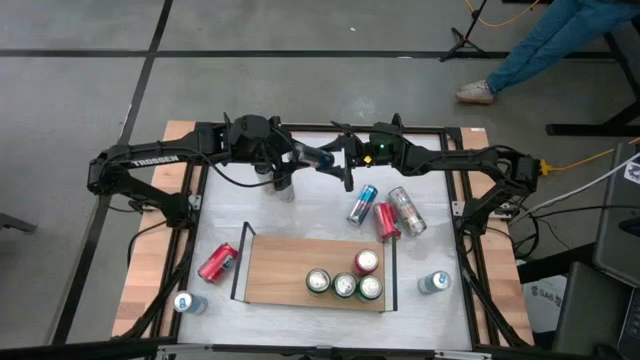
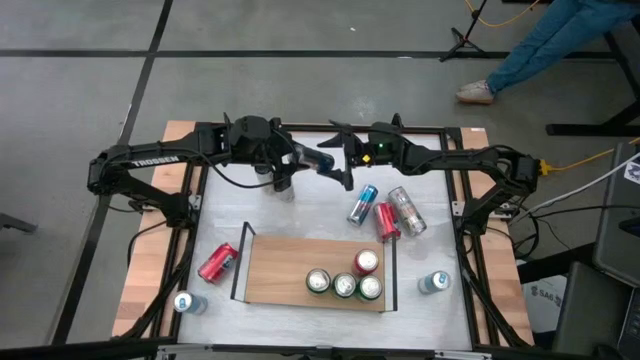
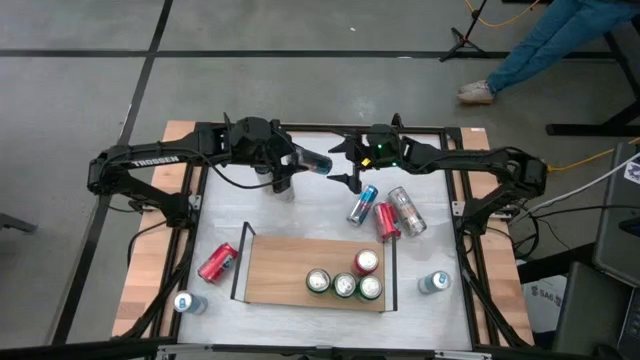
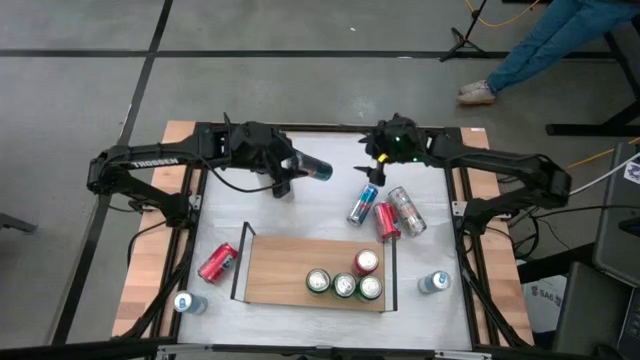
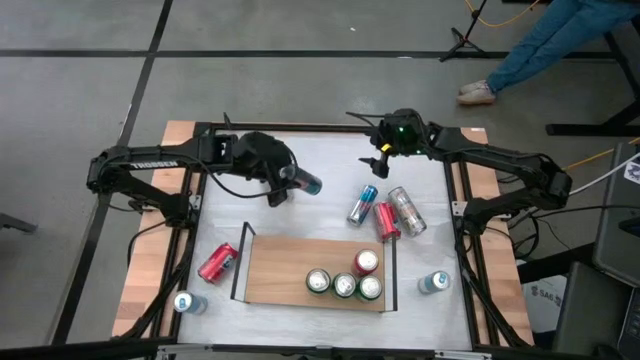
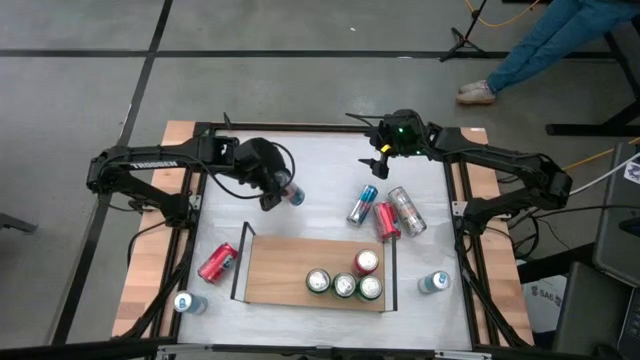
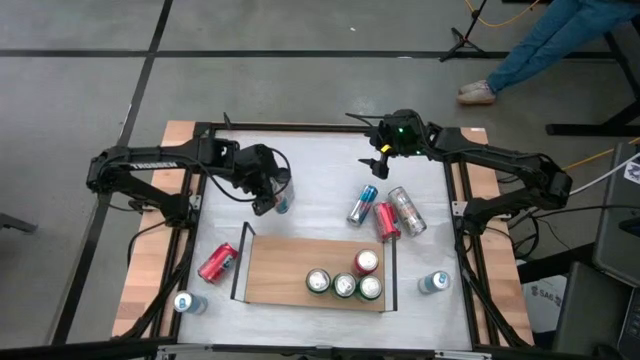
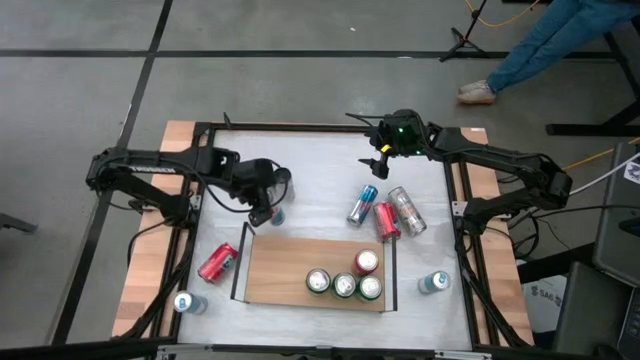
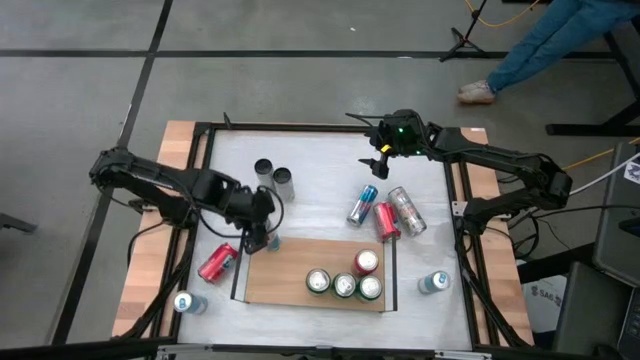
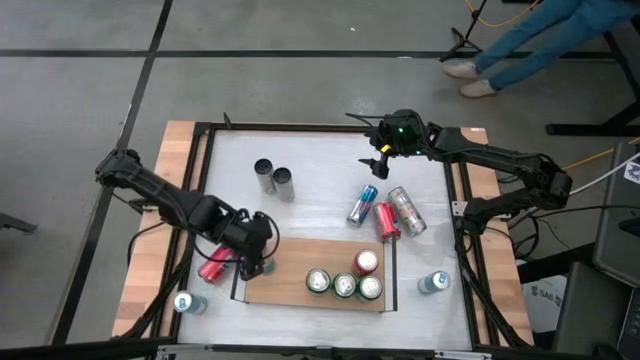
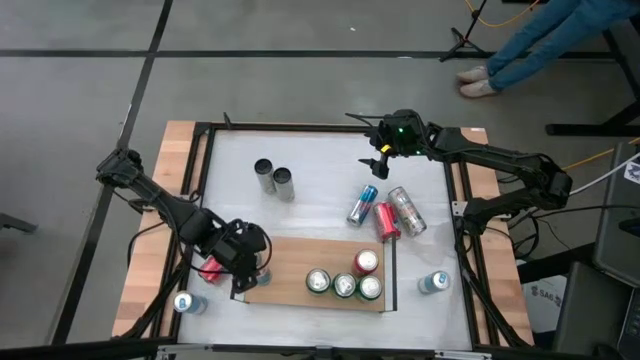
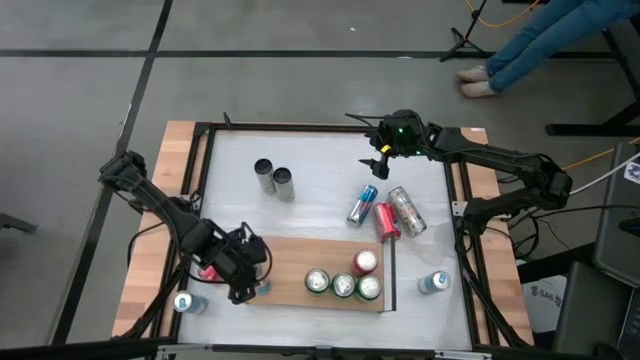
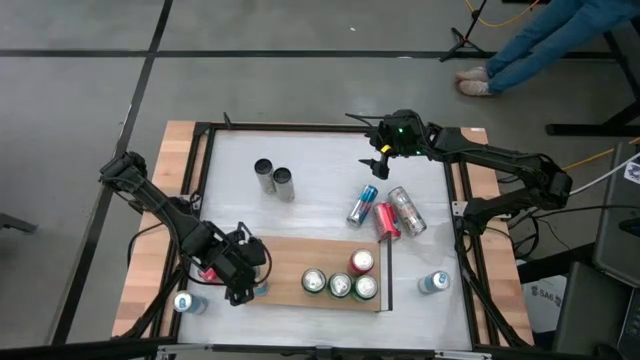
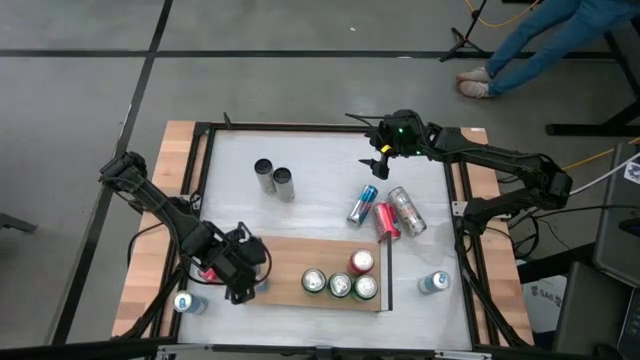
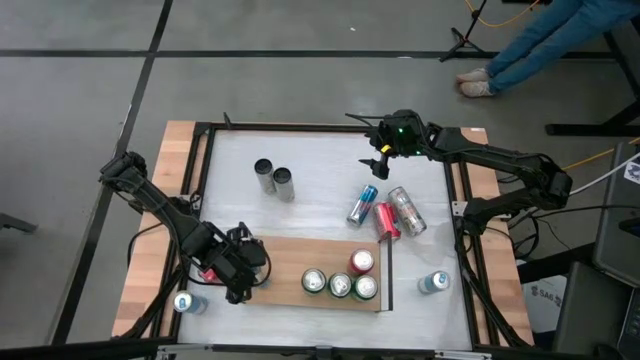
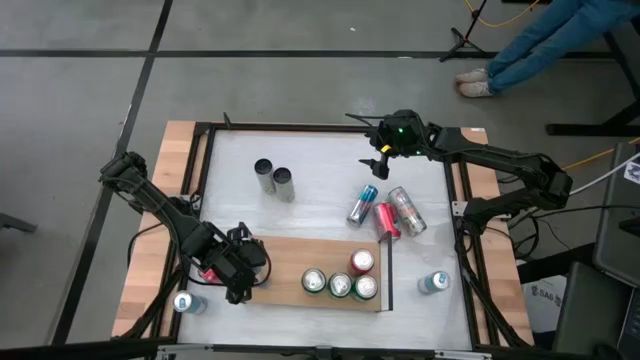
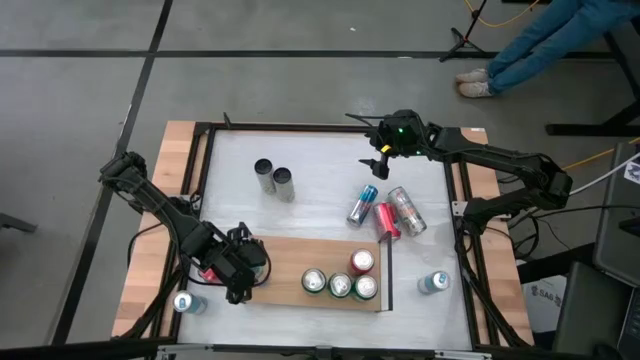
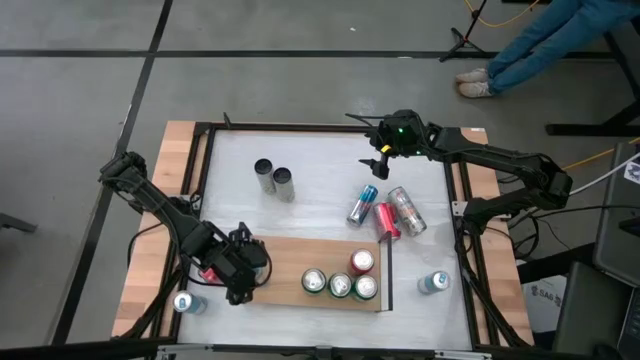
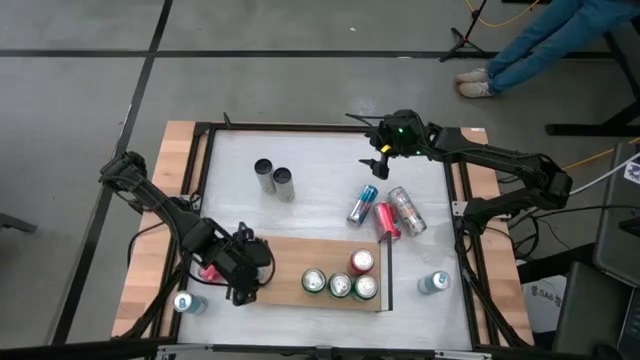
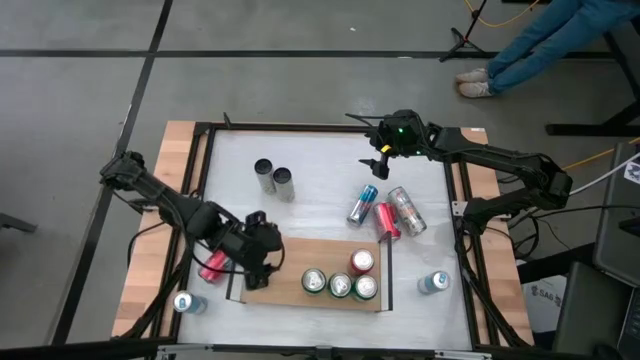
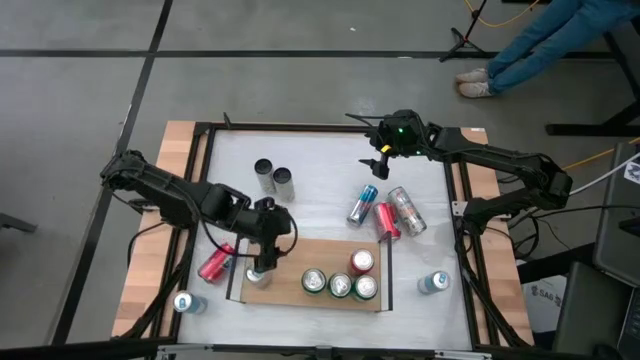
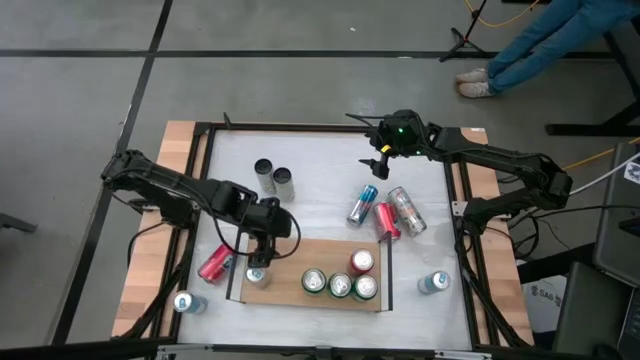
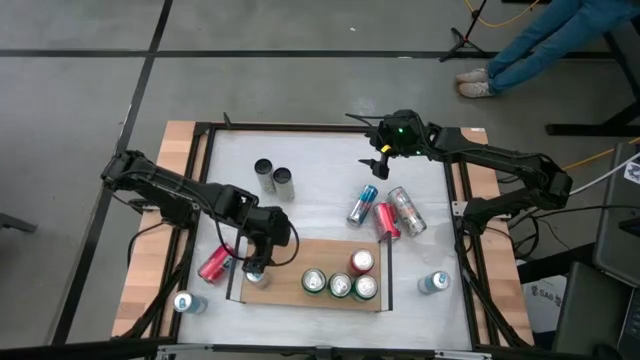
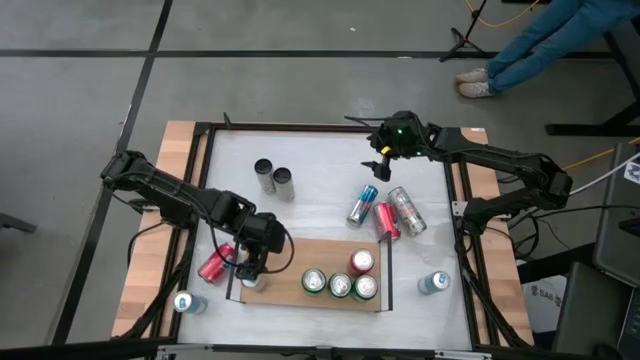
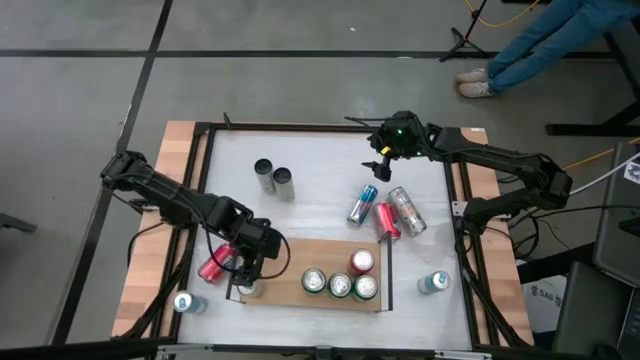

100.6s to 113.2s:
Task: Place canned beverage on shelf
Put the blue soda can on the shelf

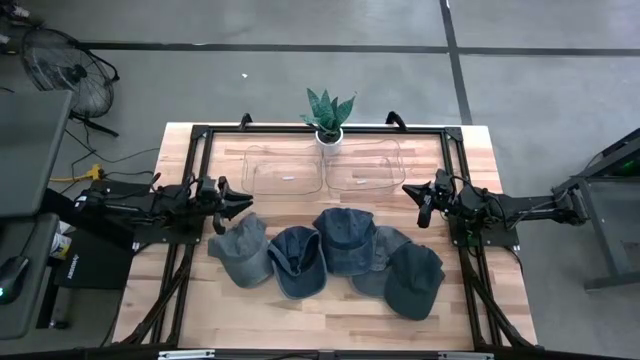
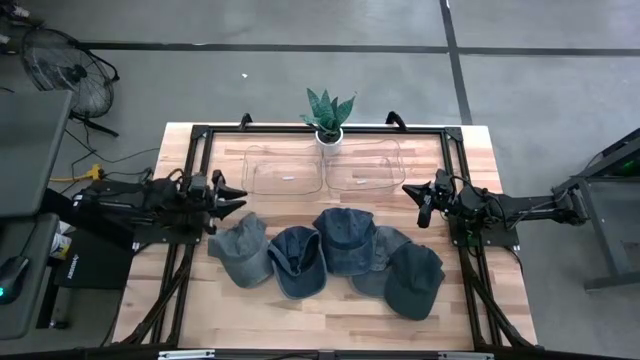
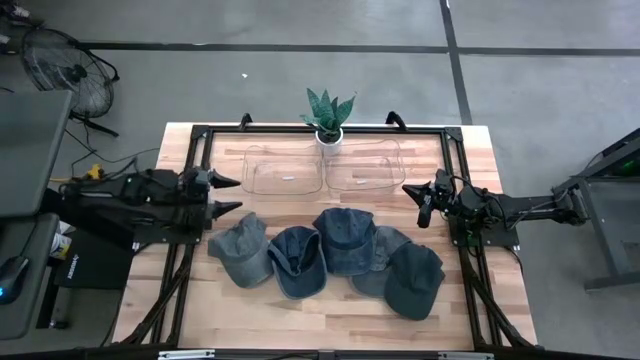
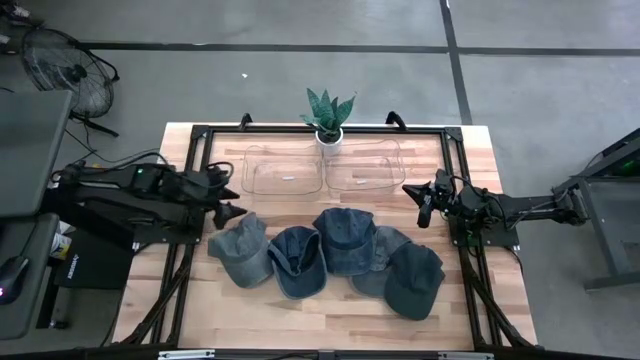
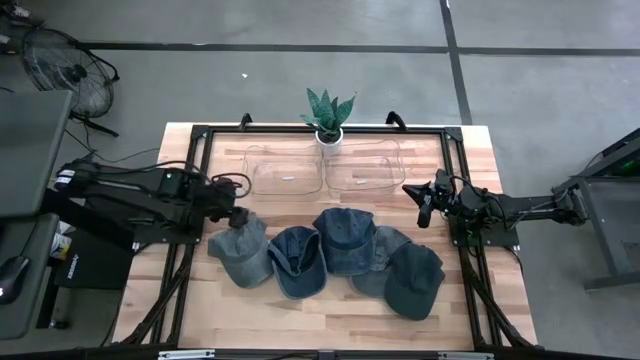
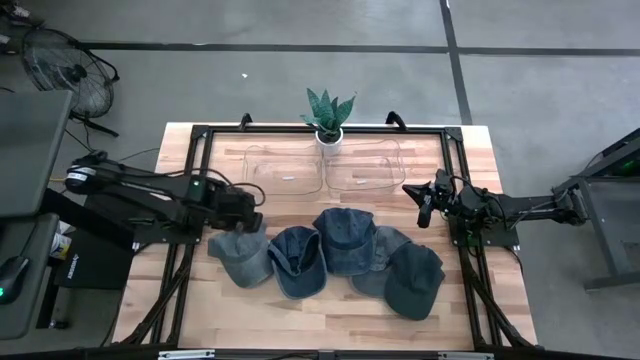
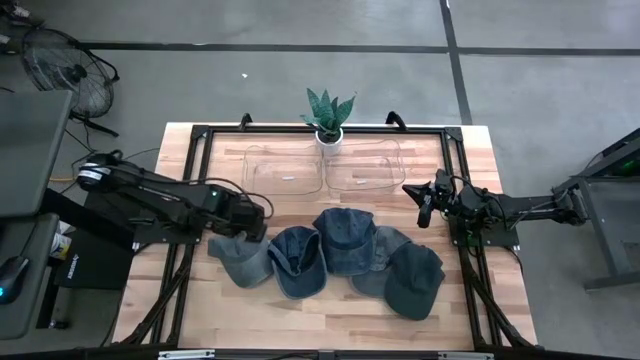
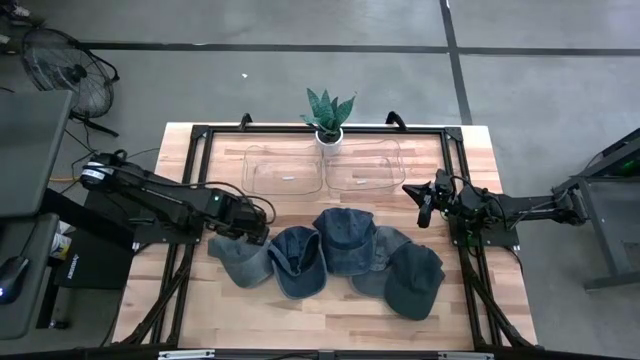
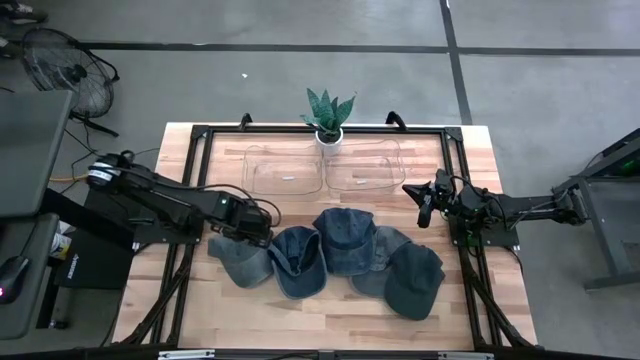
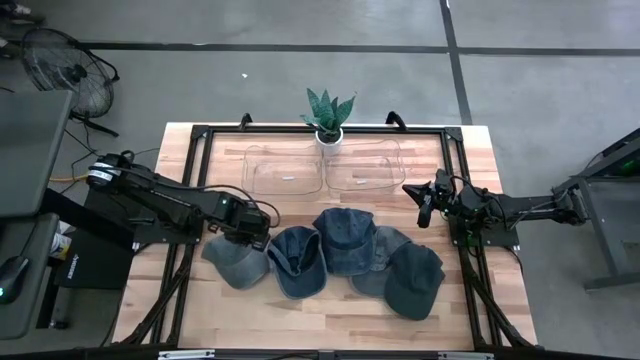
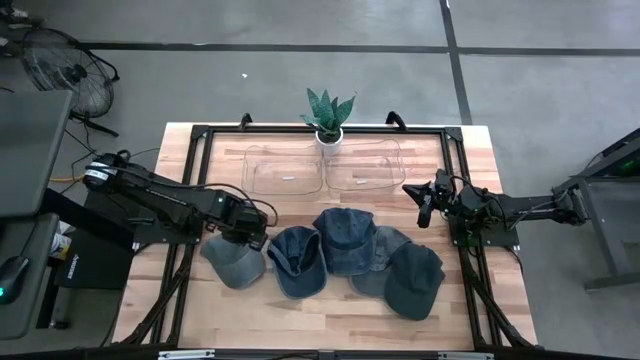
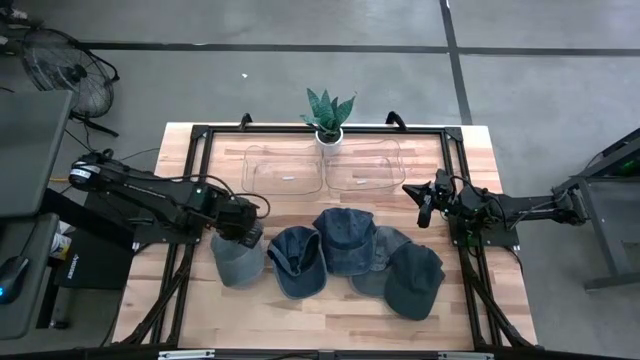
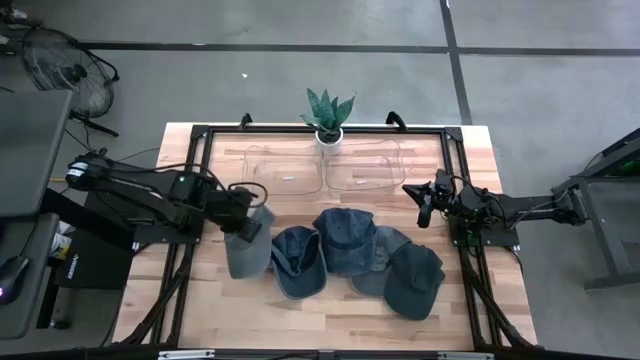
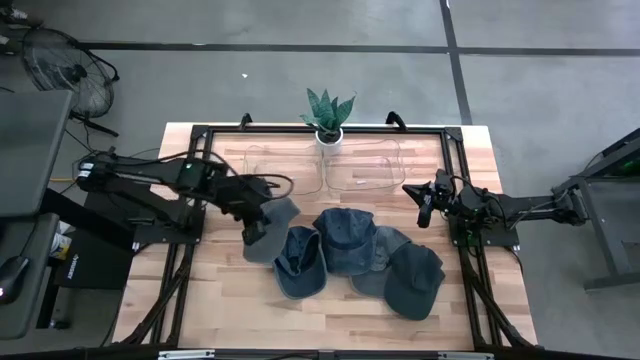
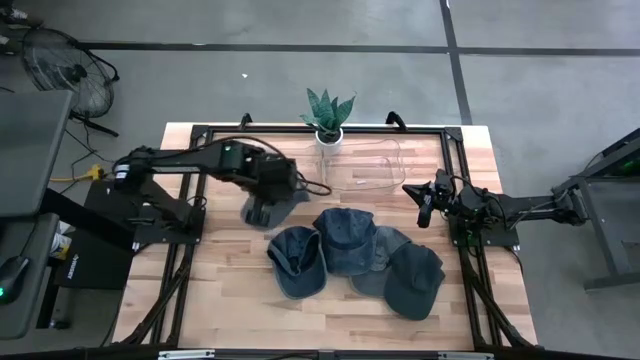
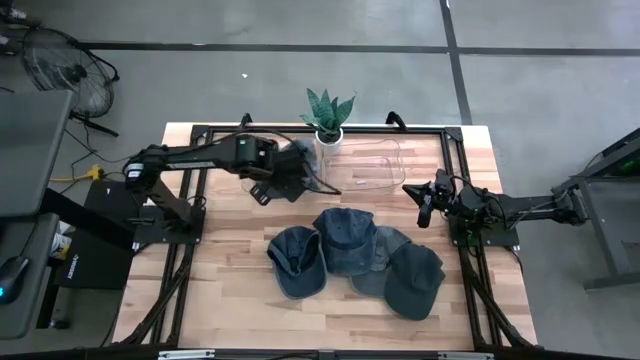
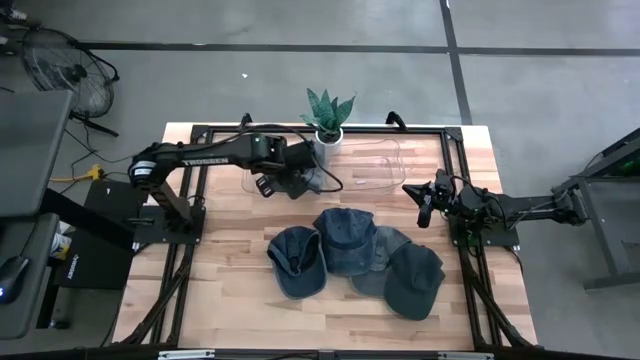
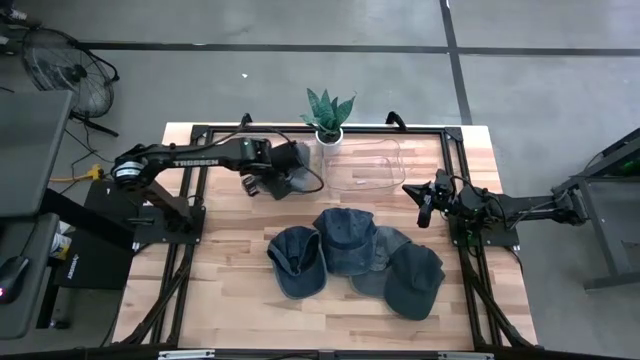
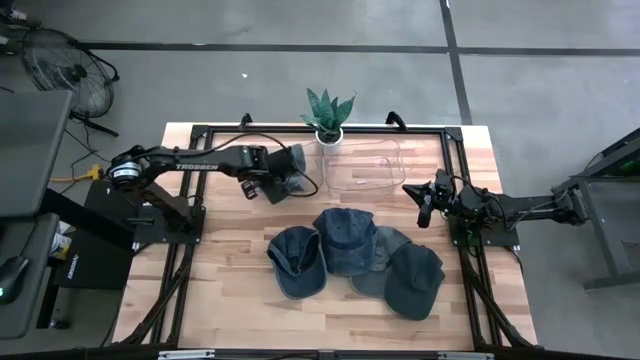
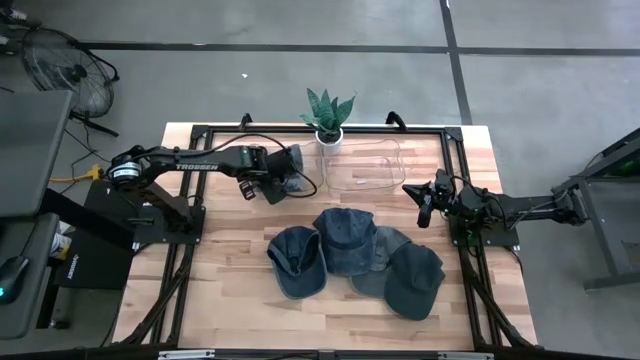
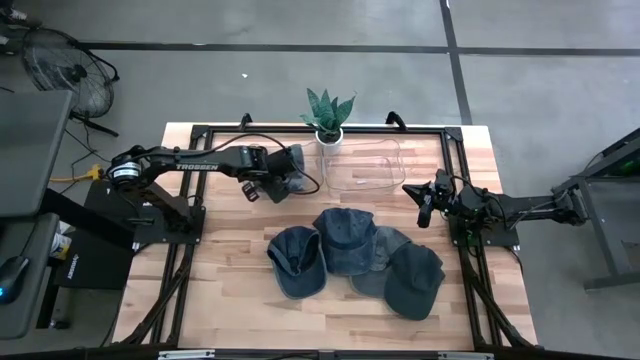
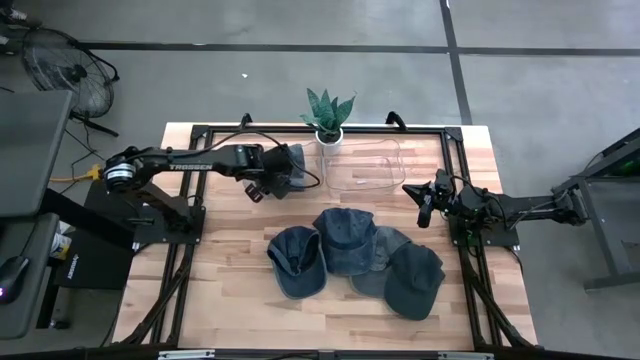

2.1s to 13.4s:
Task: Pick & Place hat
Put the left gray cap into the left transparent bin
